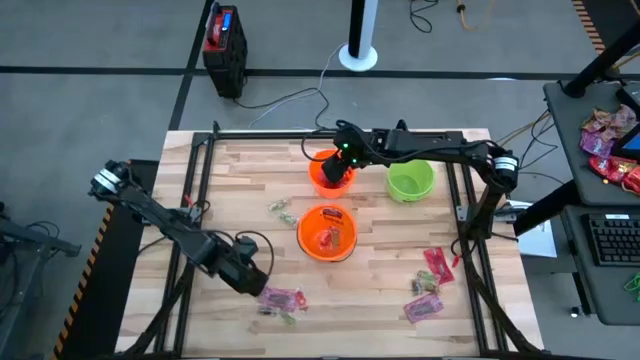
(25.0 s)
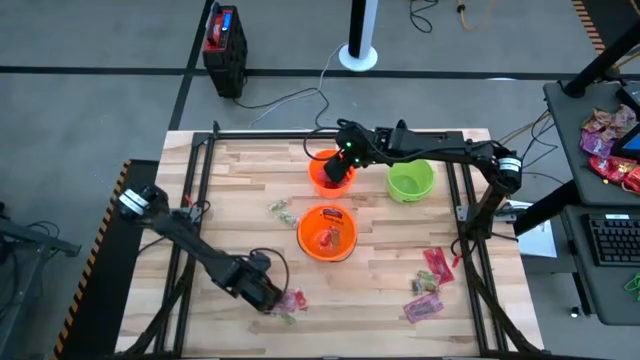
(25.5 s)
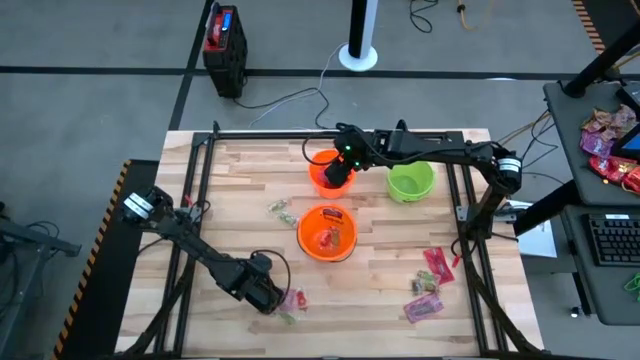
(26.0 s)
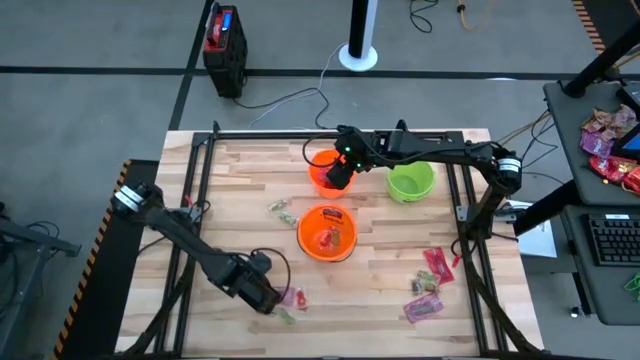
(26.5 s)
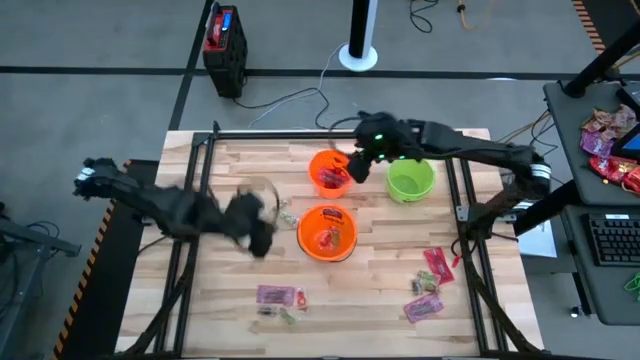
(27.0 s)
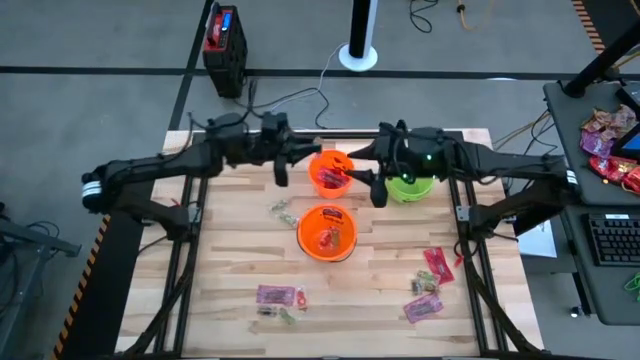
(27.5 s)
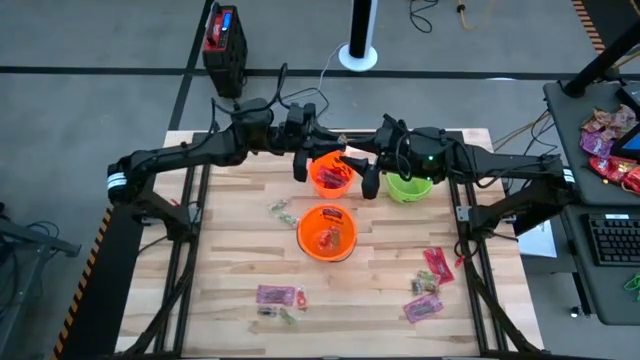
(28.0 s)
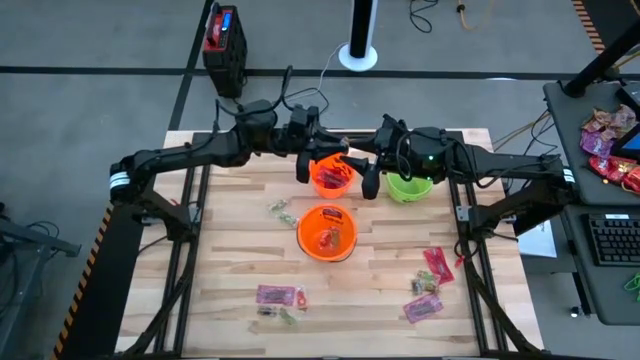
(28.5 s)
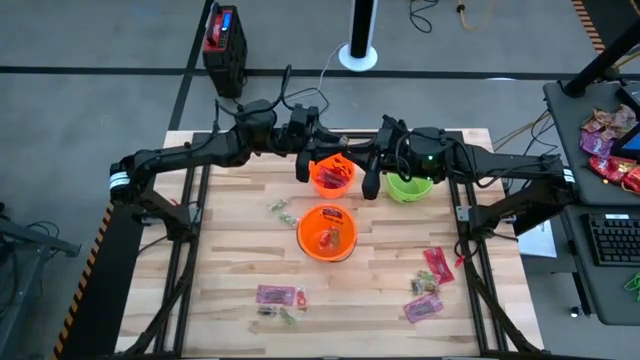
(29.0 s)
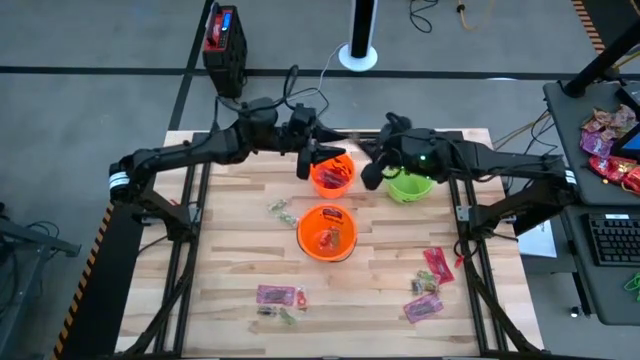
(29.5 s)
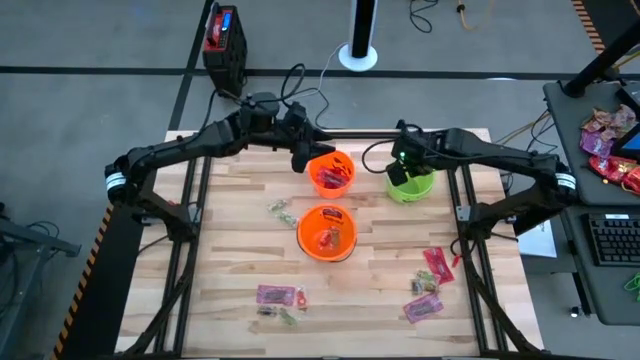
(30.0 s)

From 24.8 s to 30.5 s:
Task: Sort candy by brand, put in halloween buckets
Put the brown candy into the green bin

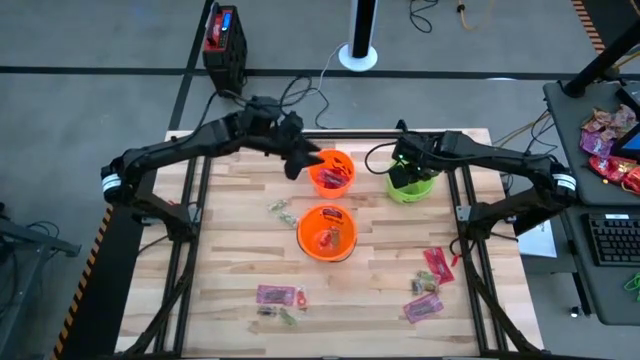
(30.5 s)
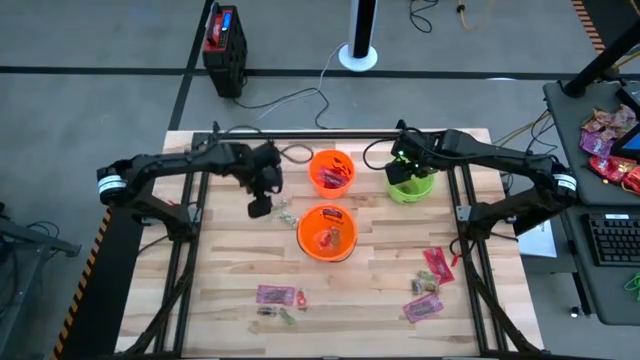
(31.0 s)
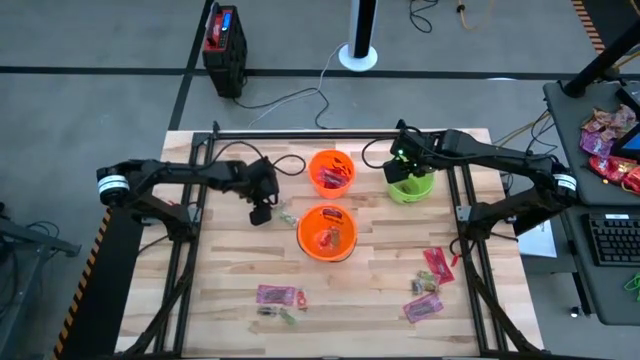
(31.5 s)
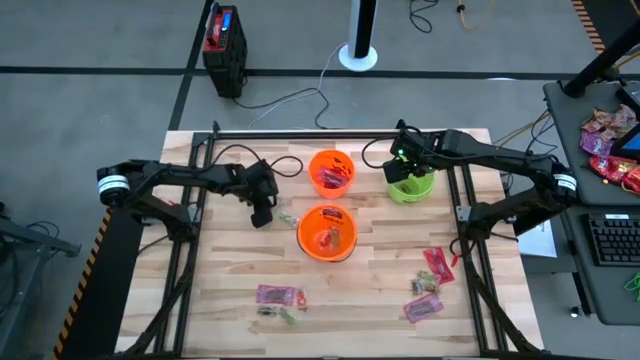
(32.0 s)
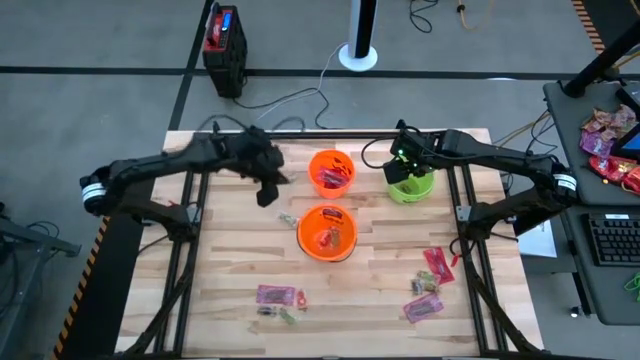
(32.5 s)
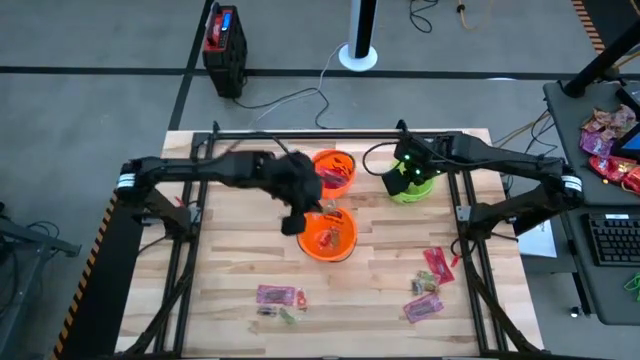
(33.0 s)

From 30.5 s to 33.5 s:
Put the green candy into the bottom orange bin

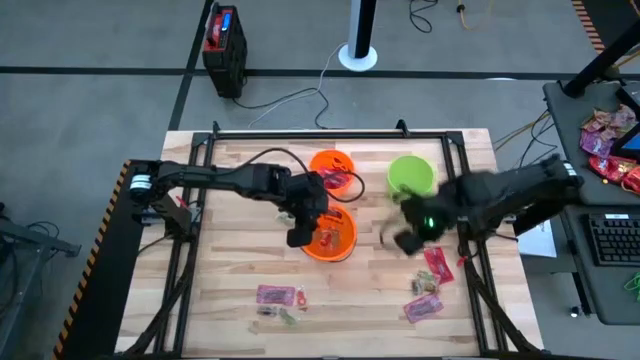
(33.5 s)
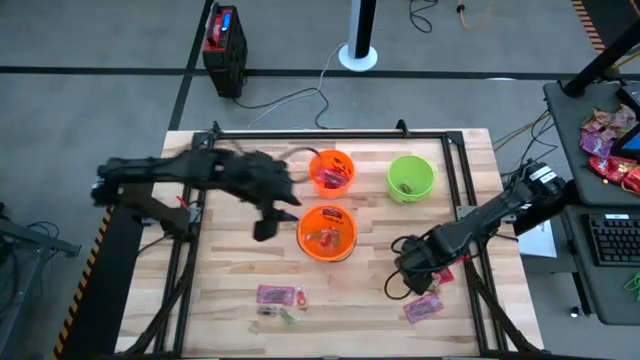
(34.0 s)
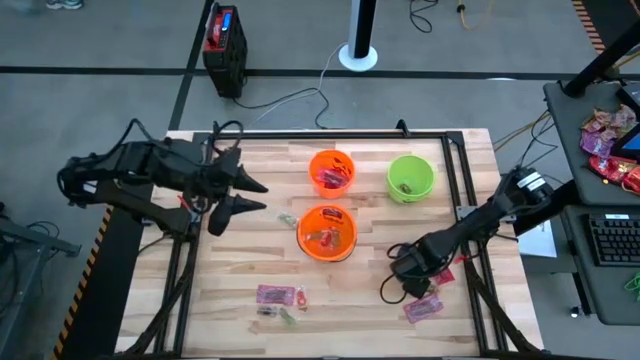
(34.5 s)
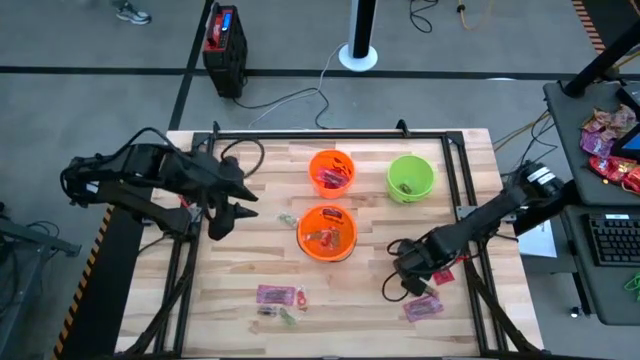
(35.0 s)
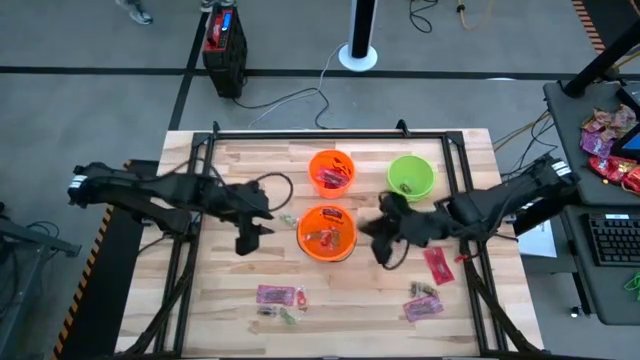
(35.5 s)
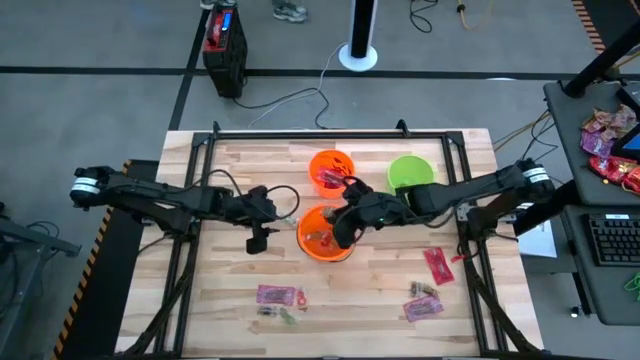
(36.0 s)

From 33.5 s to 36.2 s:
Put the green candy into the bottom orange bin

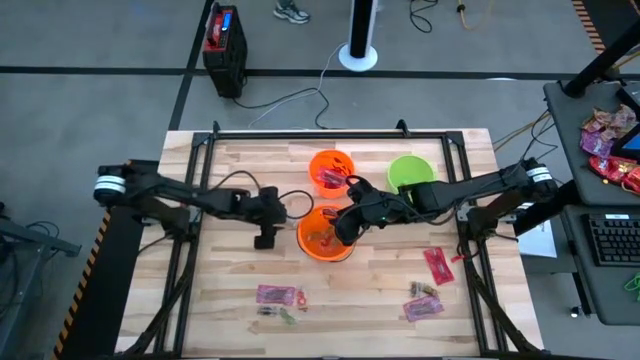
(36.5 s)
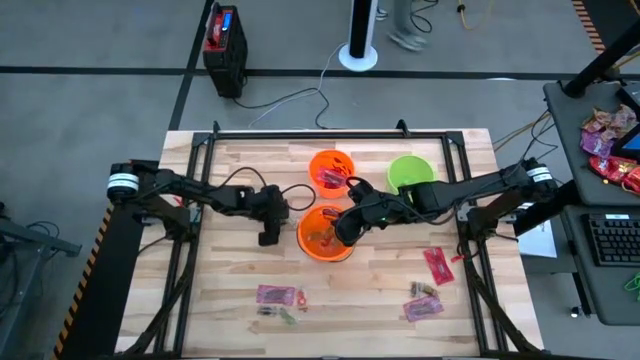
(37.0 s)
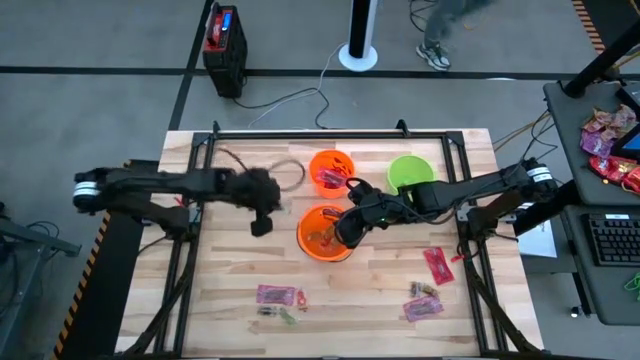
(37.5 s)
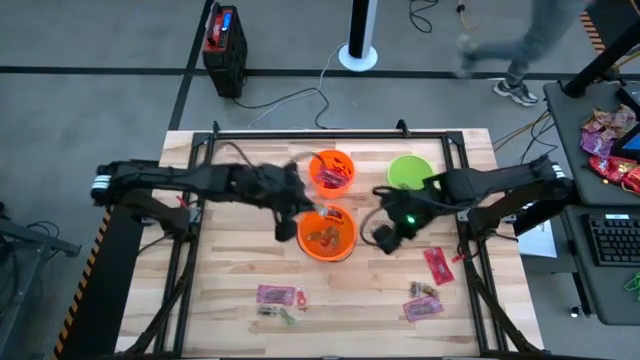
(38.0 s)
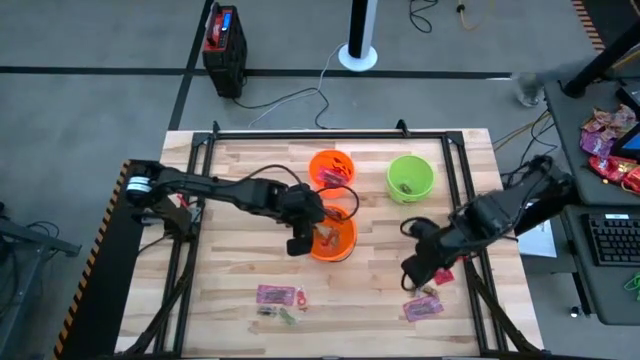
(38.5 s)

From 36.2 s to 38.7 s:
Put the top green candy into the bottom orange bin

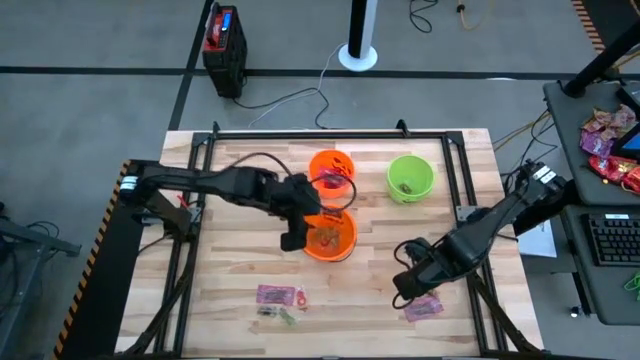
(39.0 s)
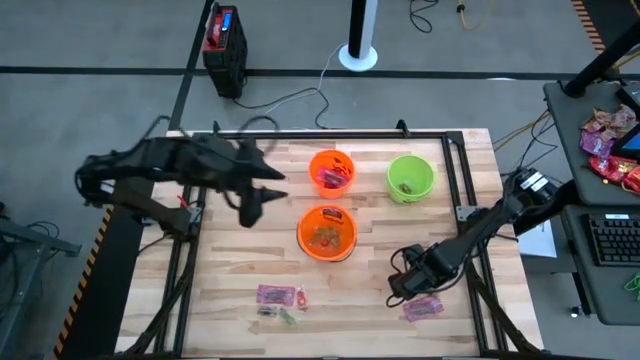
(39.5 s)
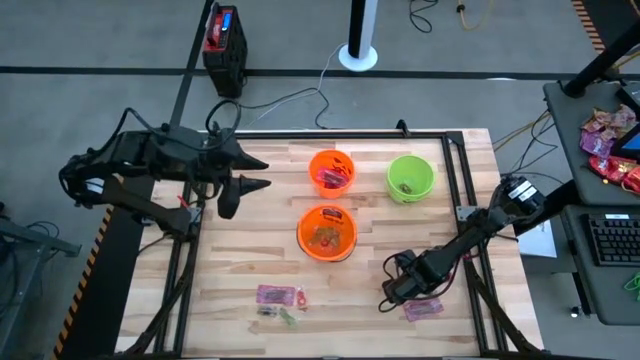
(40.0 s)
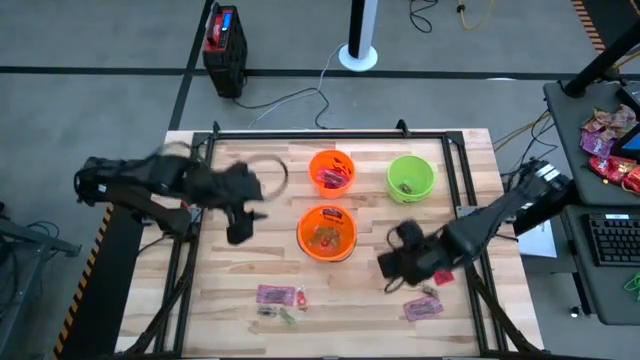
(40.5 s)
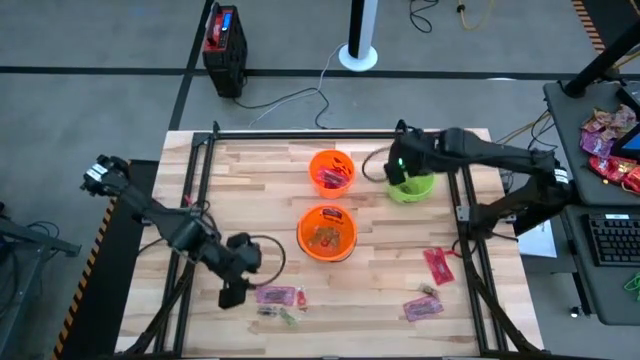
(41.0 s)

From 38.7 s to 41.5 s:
Put the brown candy into the green bin

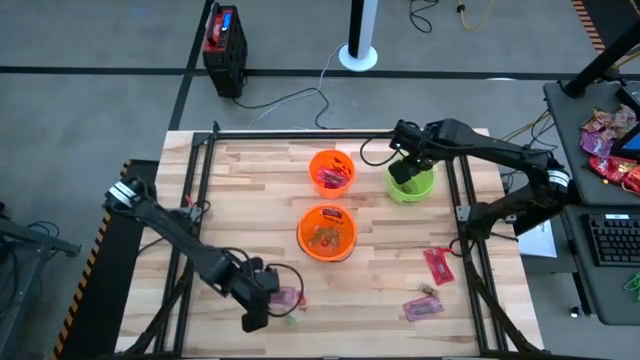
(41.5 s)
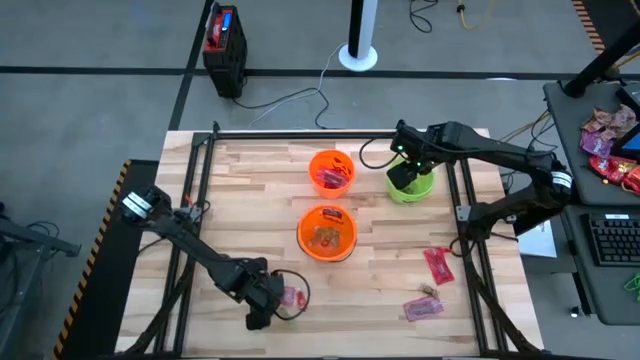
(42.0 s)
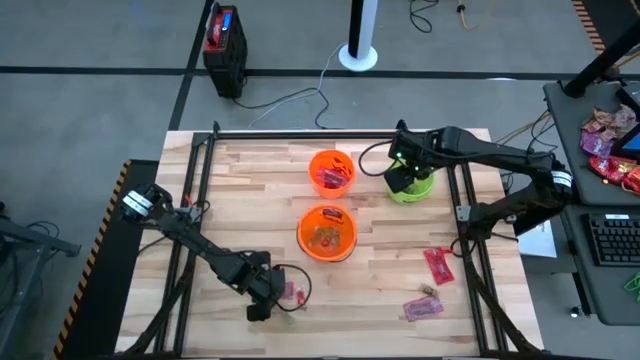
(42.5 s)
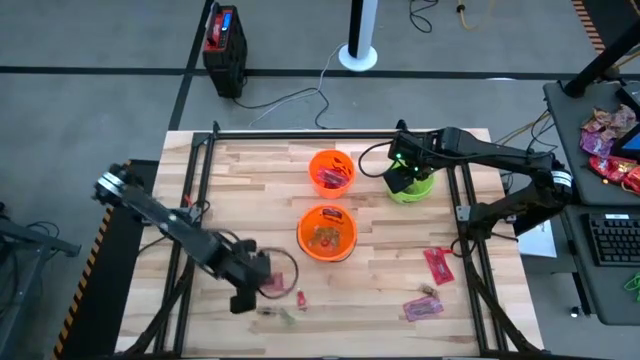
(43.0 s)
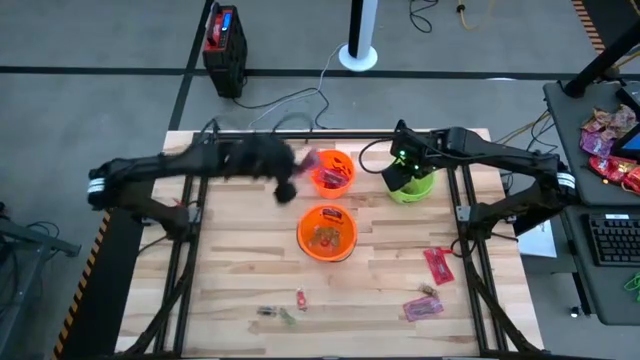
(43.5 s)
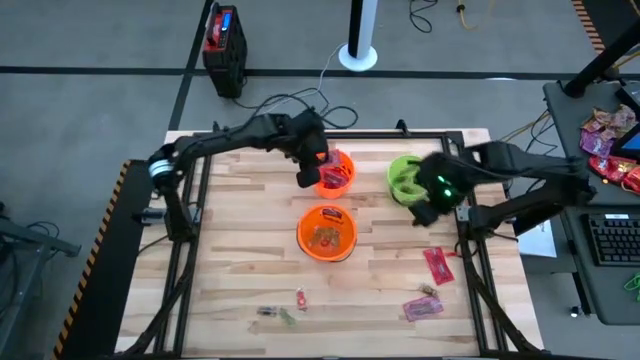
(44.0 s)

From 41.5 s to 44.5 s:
Put the left pink candy into the top orange bin

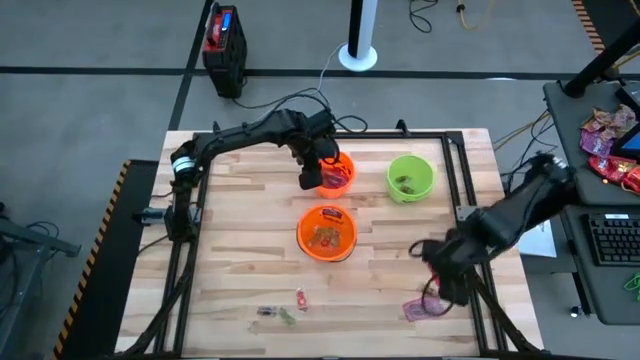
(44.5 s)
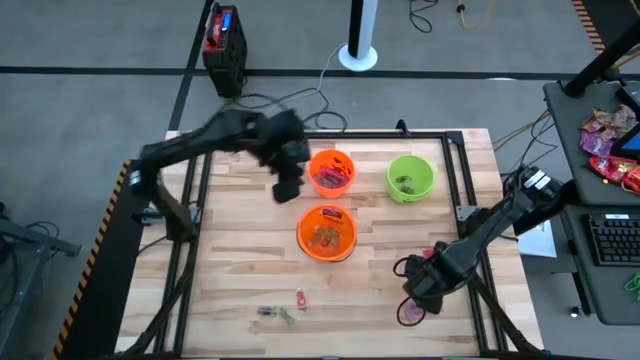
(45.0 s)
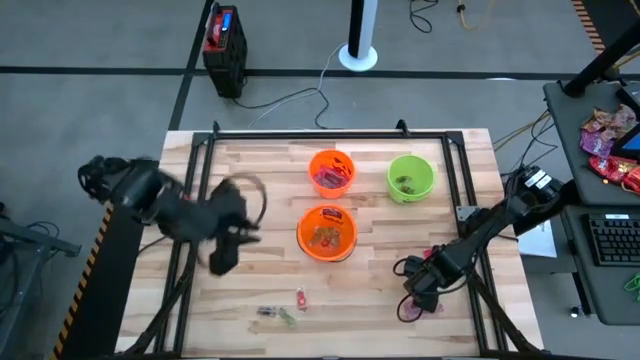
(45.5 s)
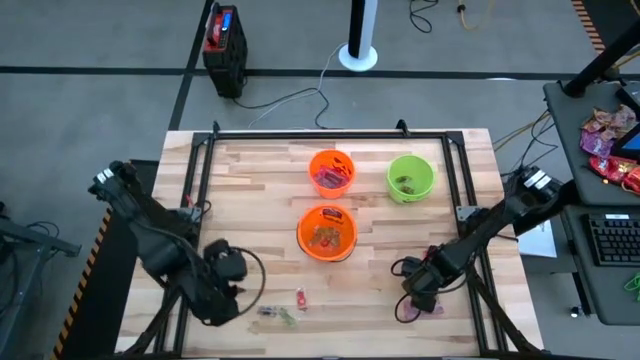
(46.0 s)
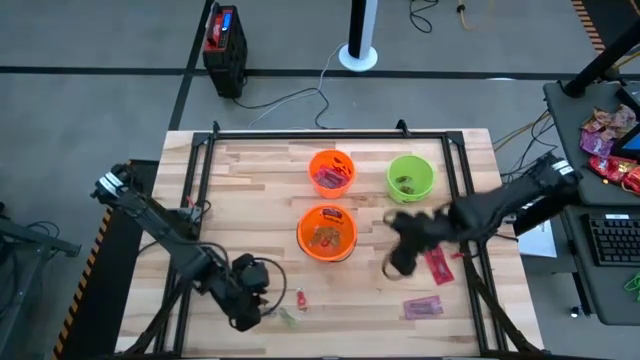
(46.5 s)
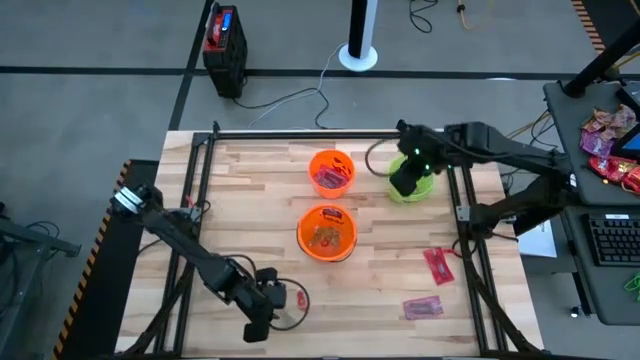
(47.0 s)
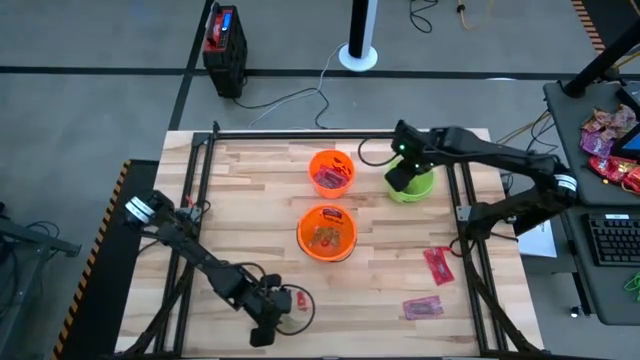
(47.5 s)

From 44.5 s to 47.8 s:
Put the right black candy into the green bin
